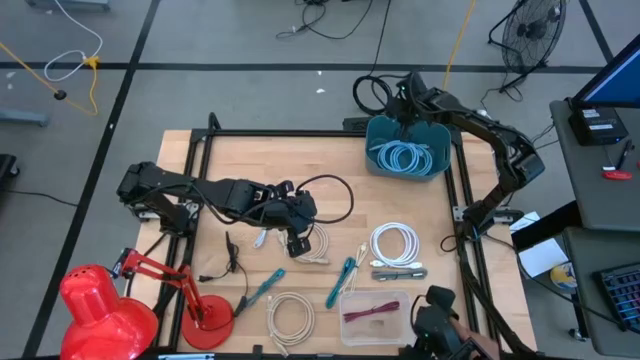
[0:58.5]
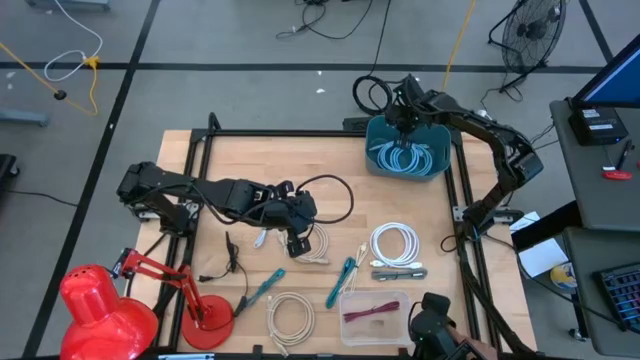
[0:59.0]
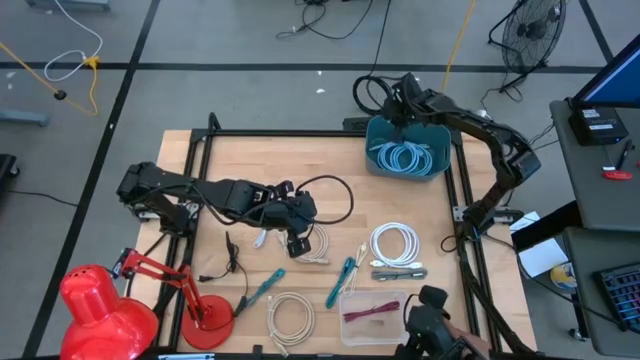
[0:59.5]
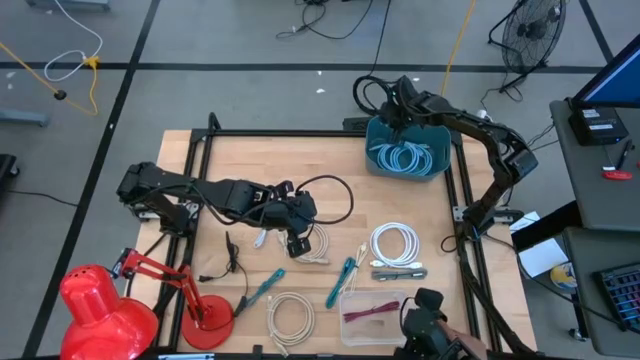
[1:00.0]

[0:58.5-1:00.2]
Task: Pick & Place USB Port
Adjust the blue bin

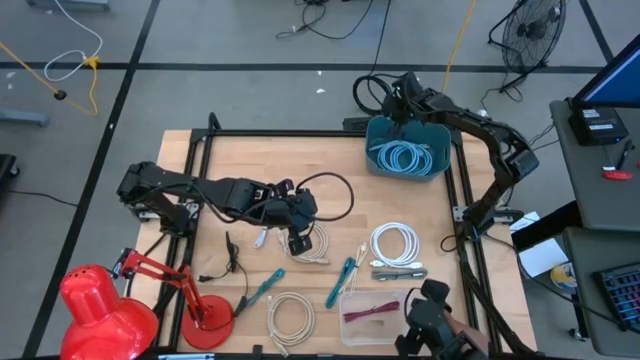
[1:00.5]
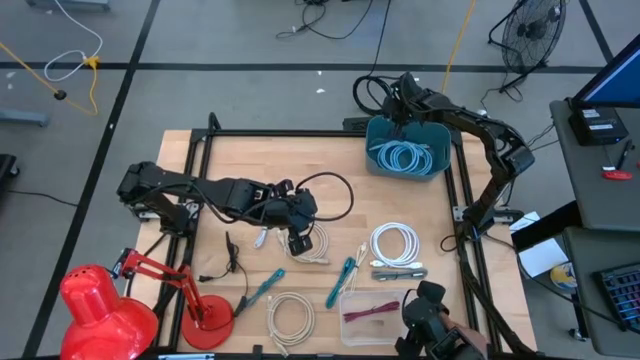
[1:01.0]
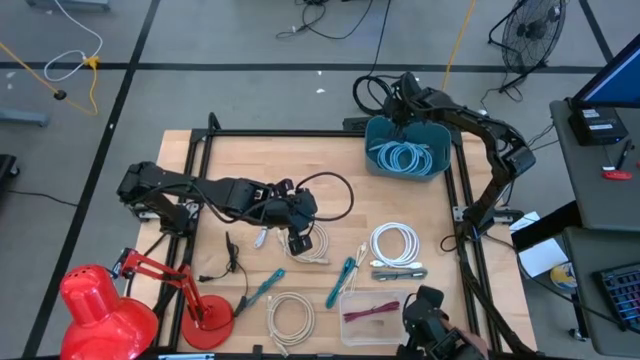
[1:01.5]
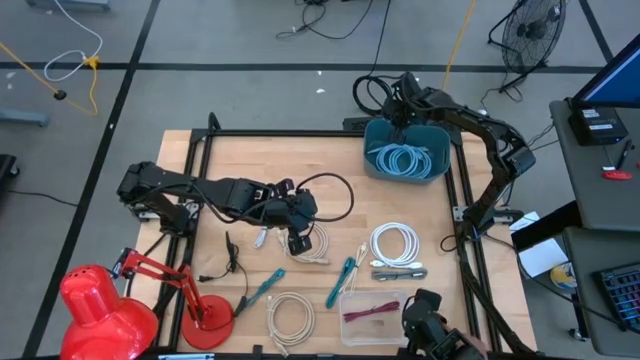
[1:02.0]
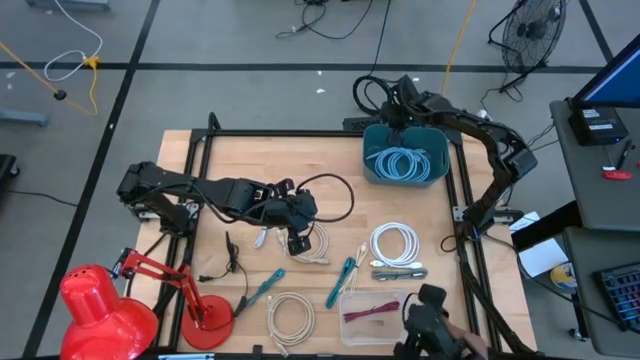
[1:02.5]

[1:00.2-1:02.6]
Adjust the blue bin

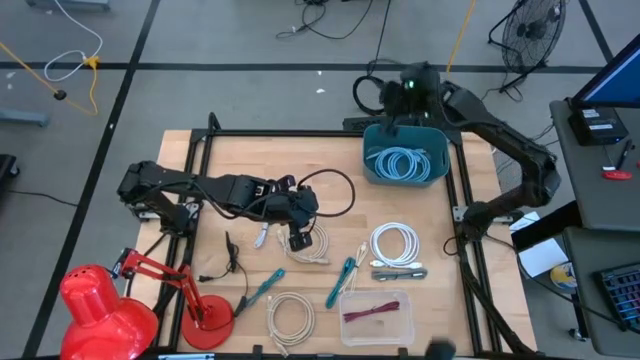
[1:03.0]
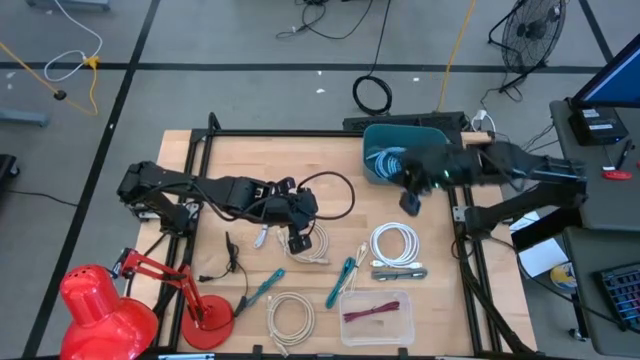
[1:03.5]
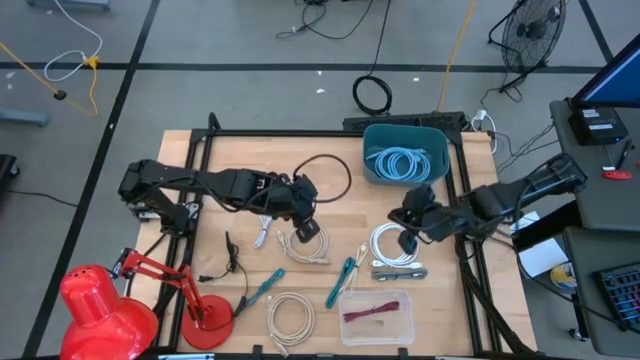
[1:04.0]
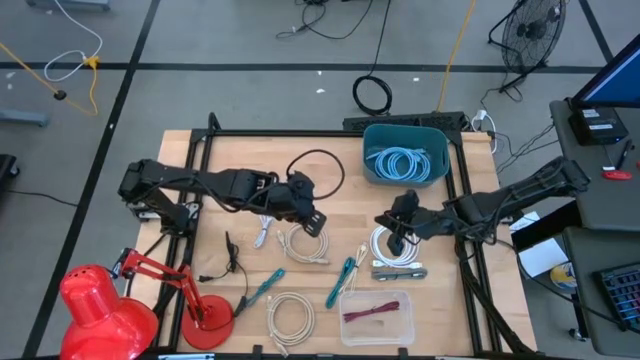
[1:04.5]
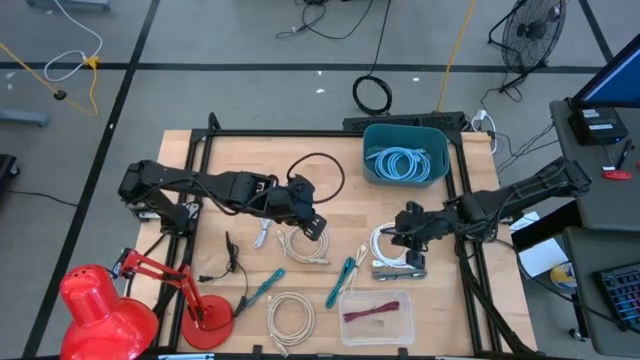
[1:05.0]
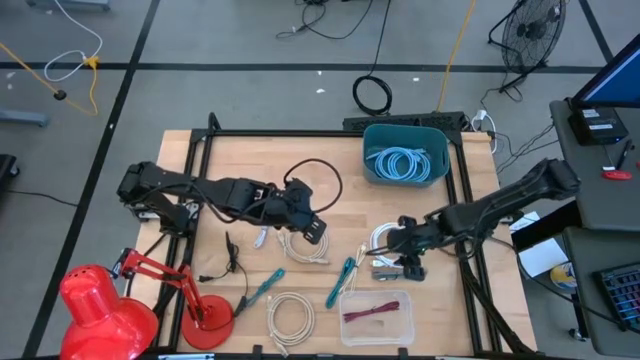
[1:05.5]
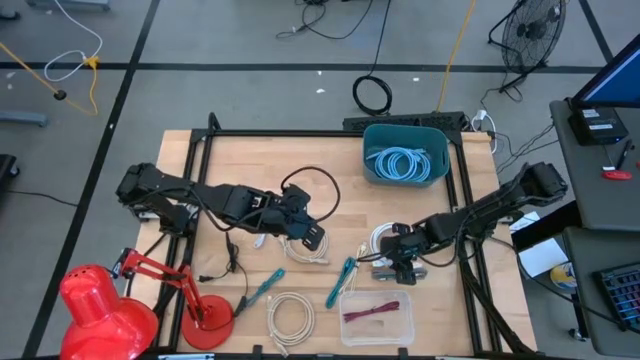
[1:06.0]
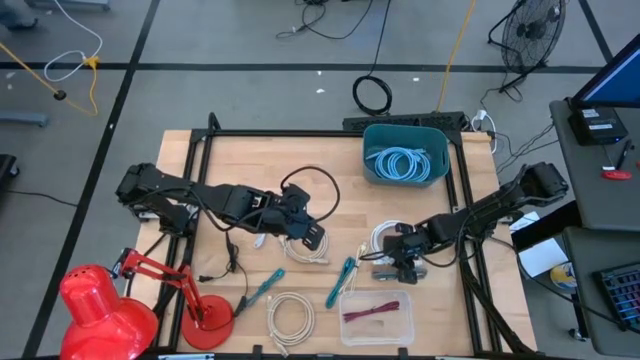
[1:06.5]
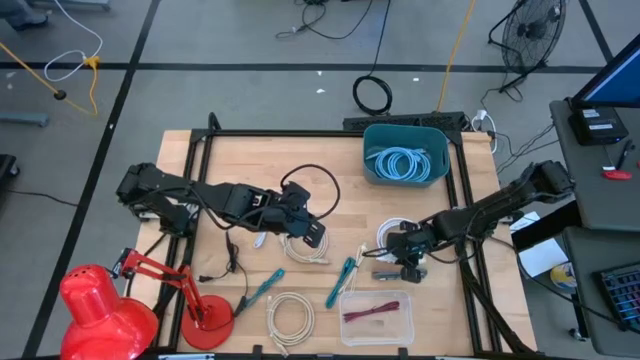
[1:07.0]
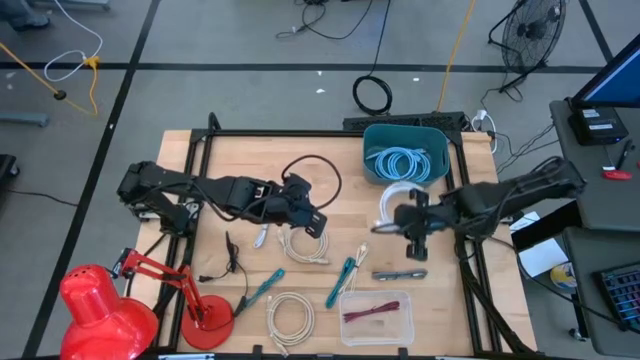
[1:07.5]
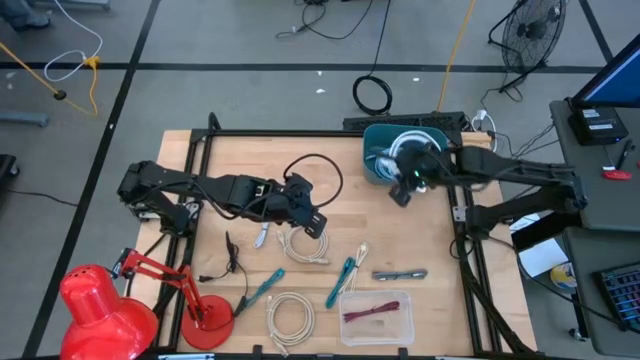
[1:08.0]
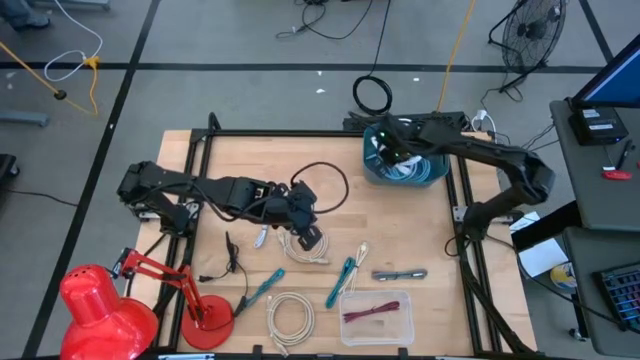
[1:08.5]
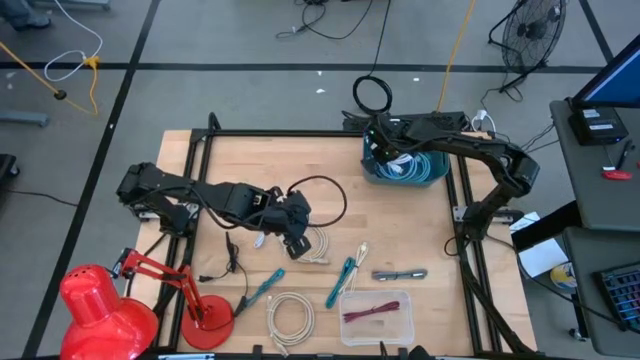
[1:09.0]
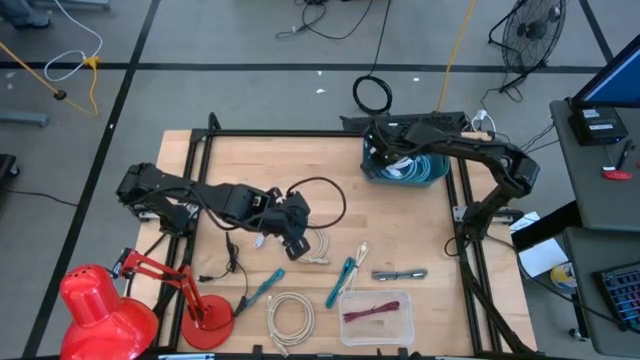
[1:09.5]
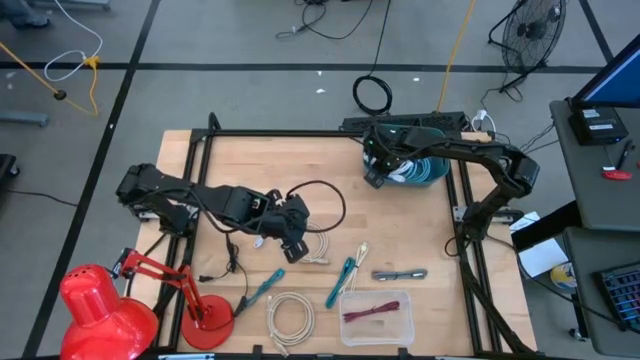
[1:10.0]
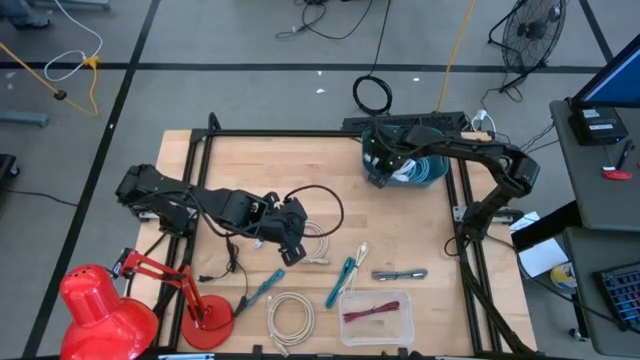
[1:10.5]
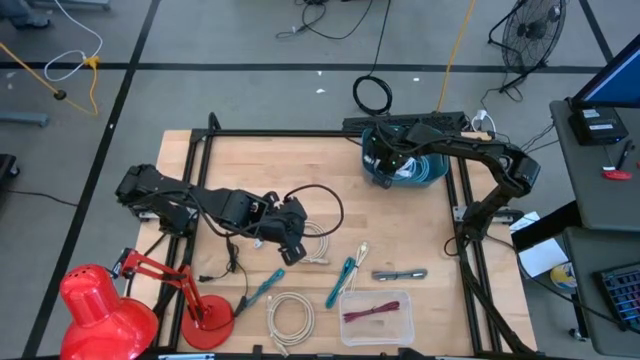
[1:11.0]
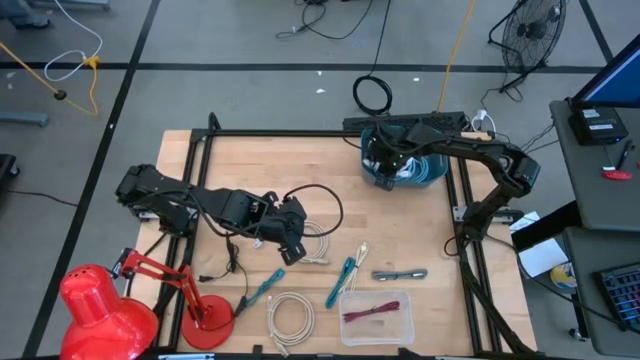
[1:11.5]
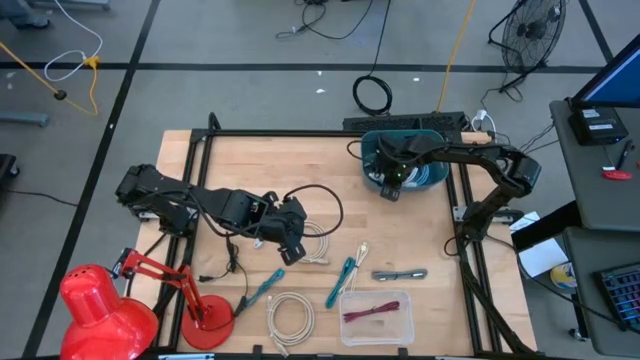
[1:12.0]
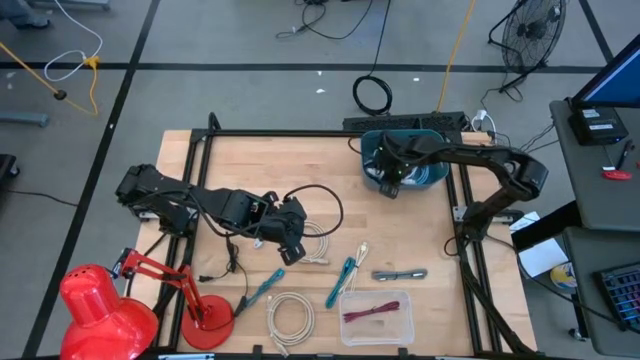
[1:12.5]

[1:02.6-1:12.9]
Put the white HDMI cable into the blue bin

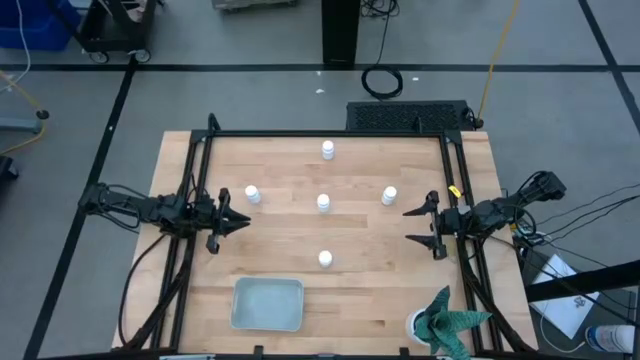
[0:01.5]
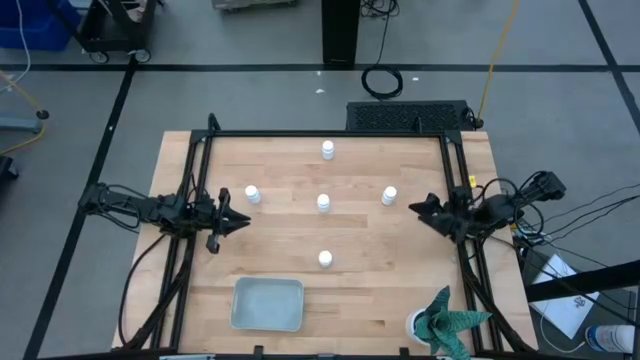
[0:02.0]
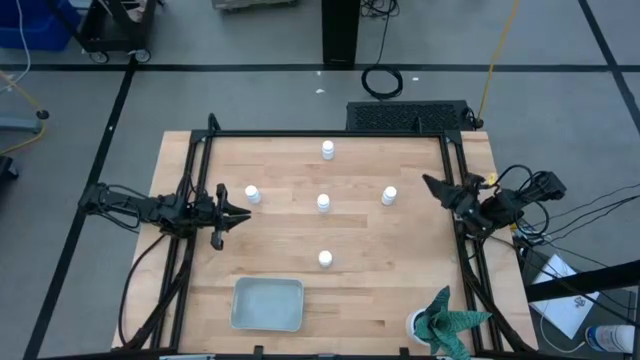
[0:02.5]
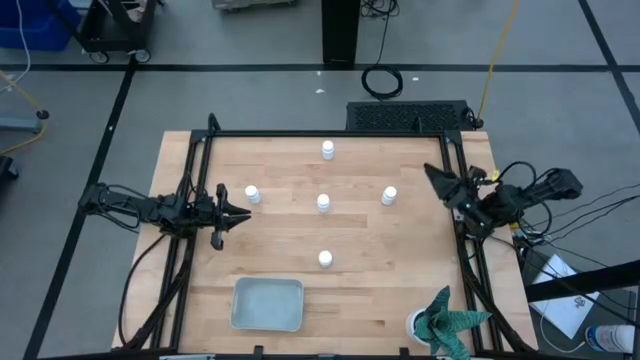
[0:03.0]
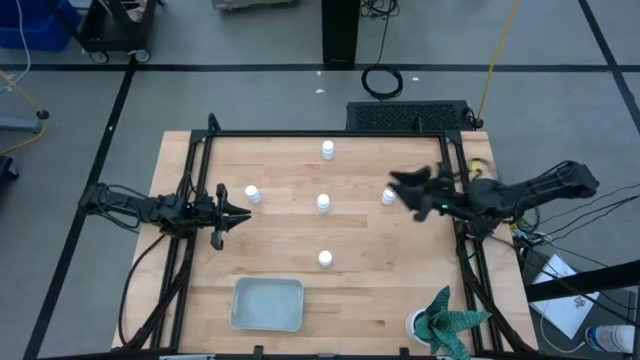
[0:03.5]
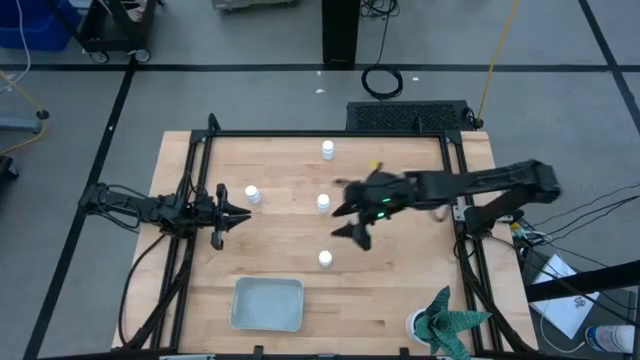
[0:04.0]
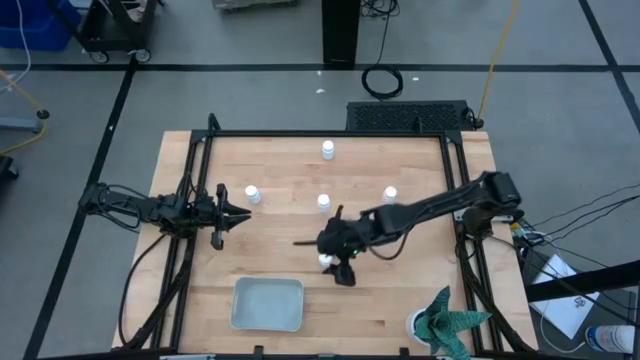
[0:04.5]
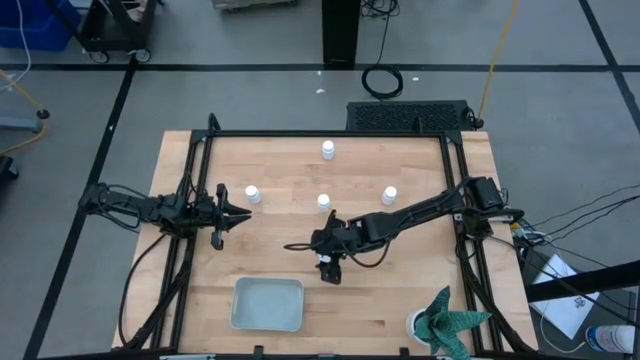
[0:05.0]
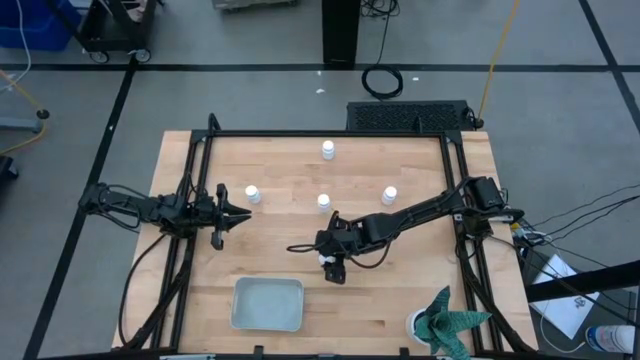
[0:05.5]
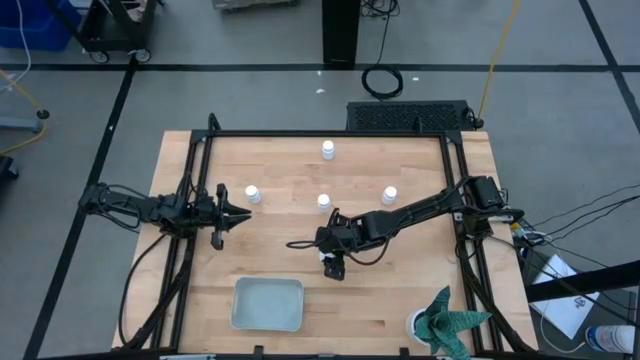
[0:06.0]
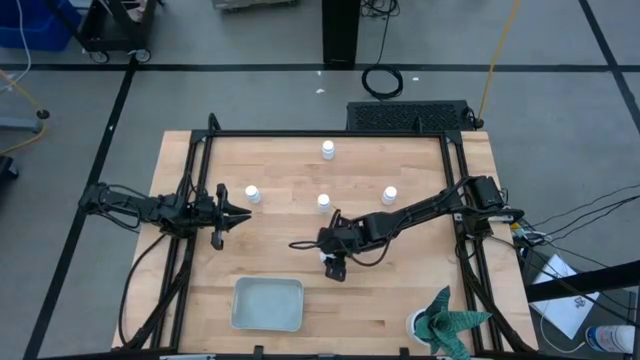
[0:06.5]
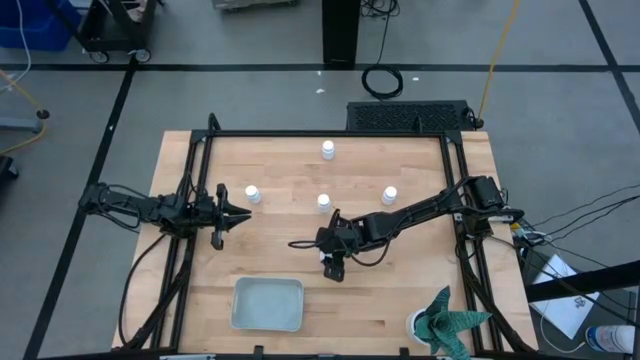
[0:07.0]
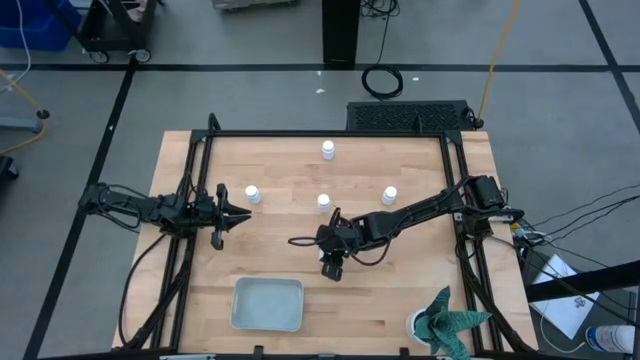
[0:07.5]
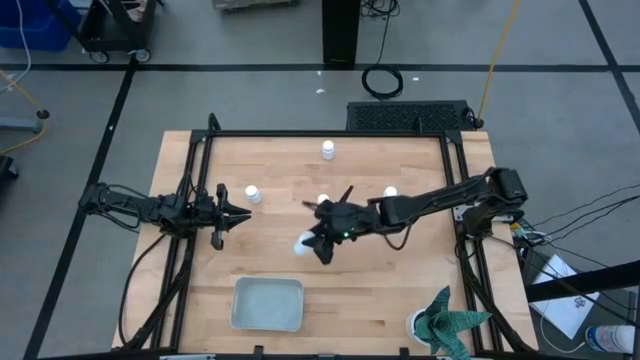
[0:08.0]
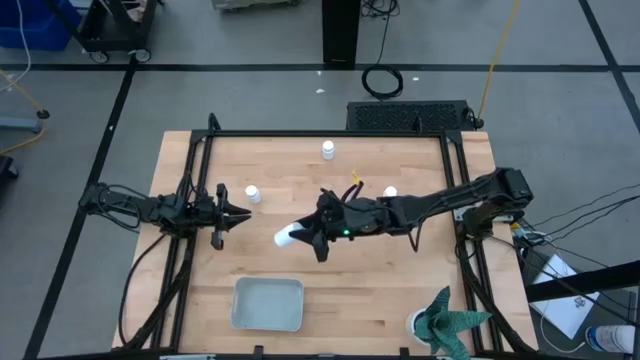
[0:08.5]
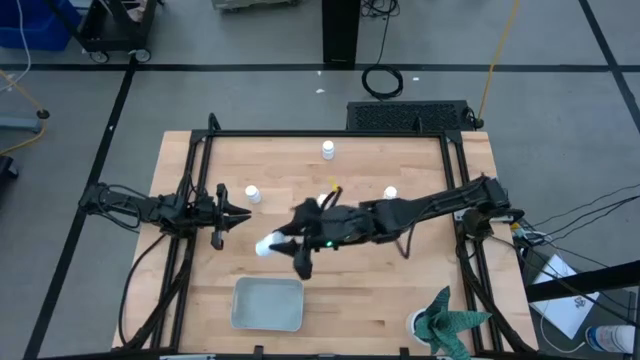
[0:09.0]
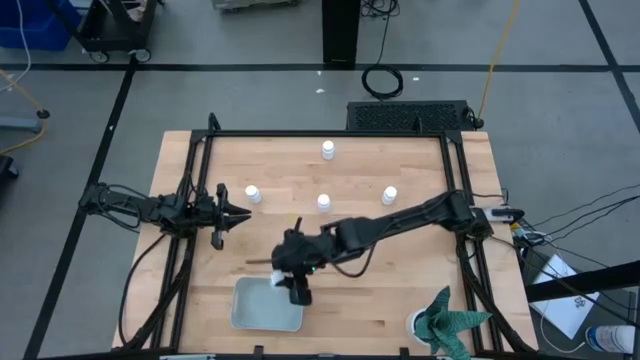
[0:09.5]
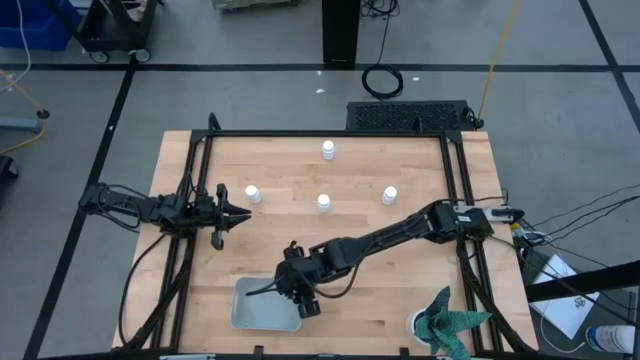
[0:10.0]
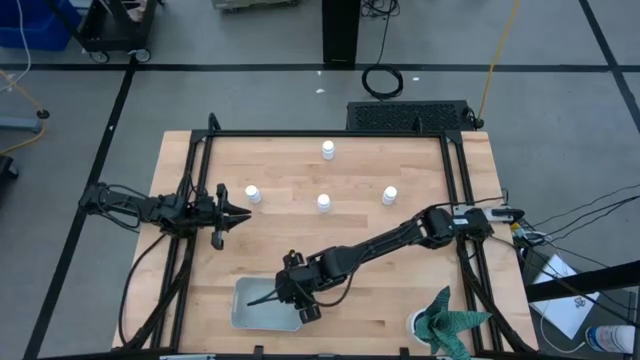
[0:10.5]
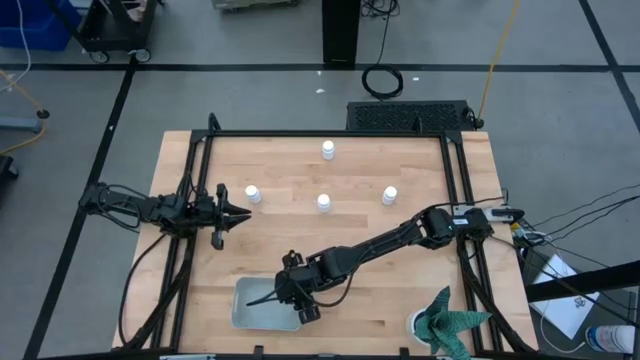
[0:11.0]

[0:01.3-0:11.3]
Task: Pick and place pill bottles into a basket
Put the white medicine bottle into the gray bin
